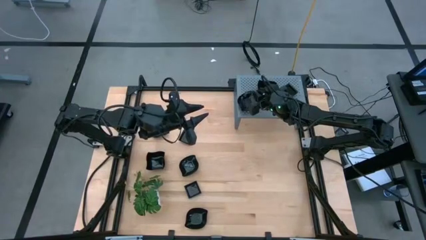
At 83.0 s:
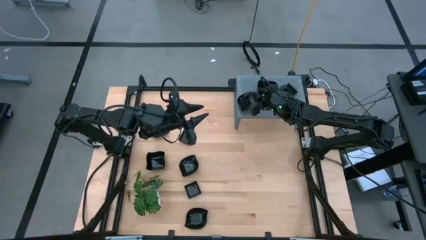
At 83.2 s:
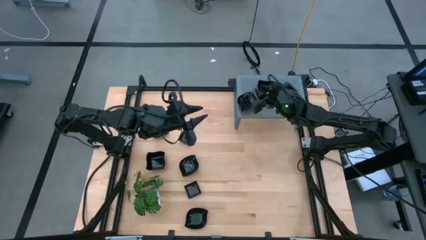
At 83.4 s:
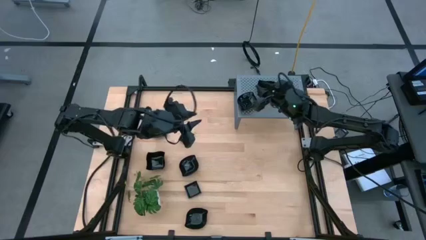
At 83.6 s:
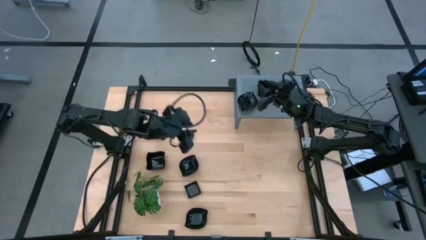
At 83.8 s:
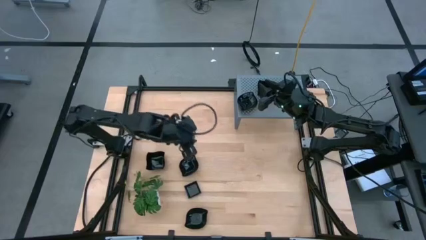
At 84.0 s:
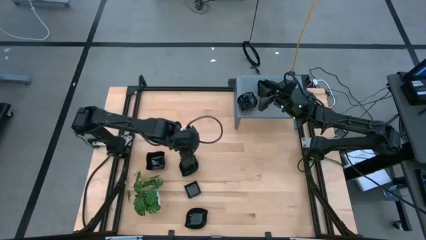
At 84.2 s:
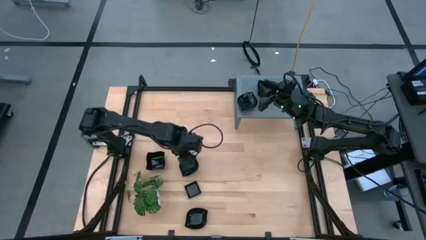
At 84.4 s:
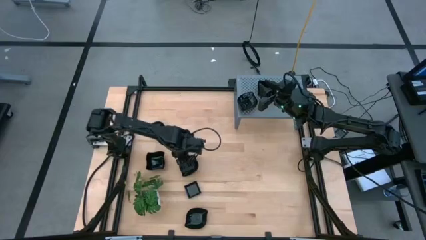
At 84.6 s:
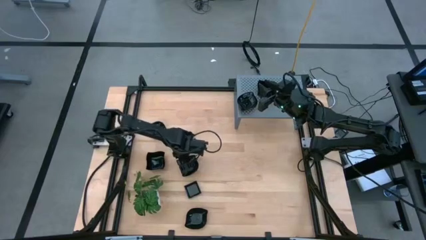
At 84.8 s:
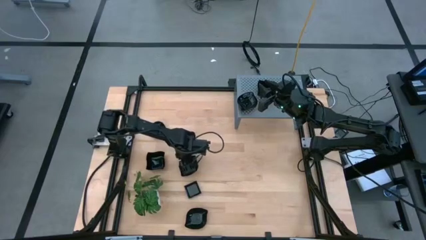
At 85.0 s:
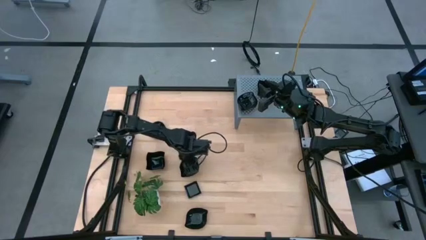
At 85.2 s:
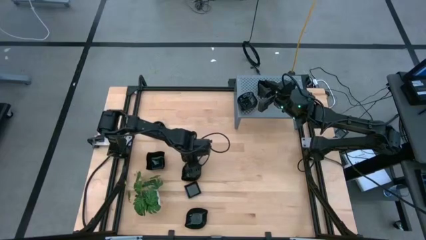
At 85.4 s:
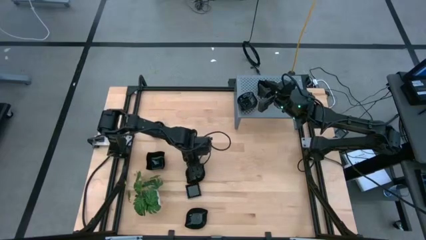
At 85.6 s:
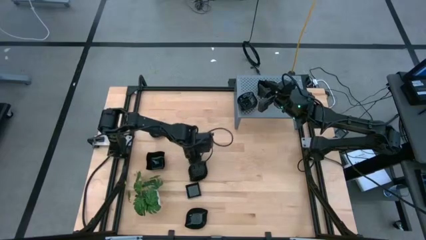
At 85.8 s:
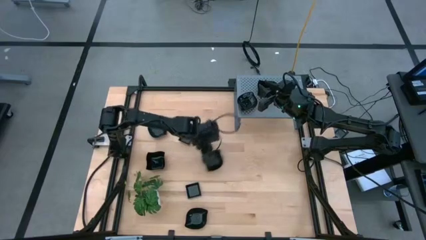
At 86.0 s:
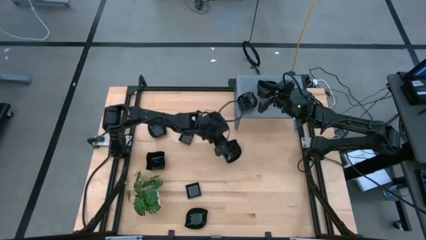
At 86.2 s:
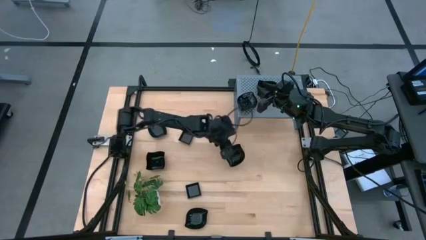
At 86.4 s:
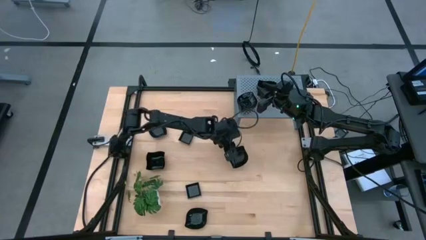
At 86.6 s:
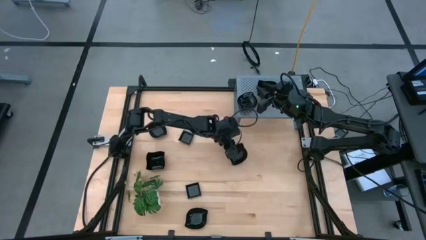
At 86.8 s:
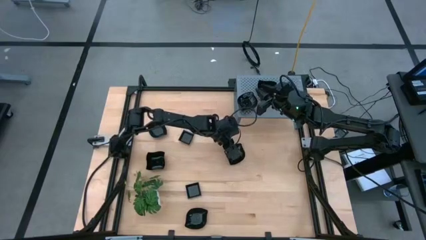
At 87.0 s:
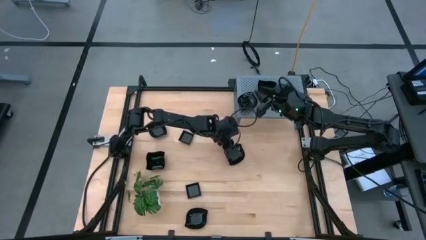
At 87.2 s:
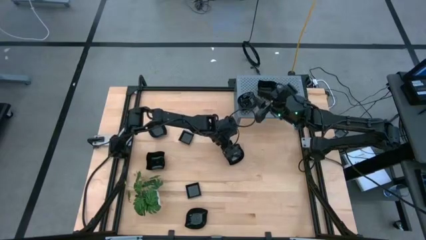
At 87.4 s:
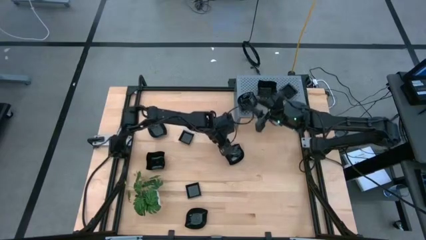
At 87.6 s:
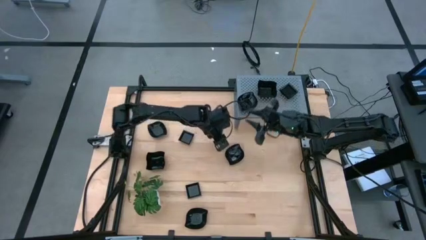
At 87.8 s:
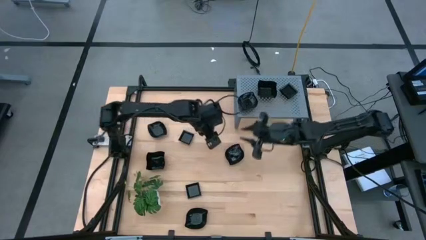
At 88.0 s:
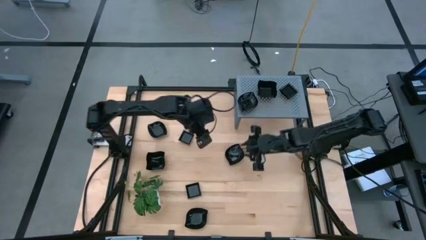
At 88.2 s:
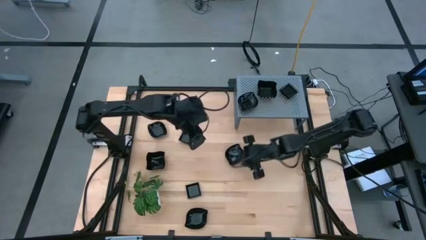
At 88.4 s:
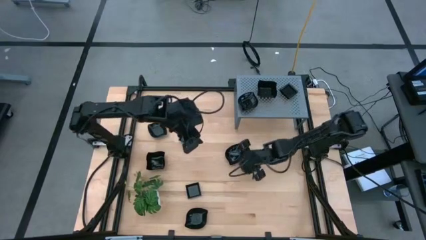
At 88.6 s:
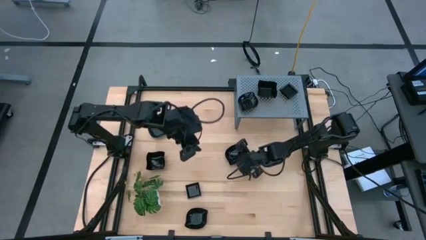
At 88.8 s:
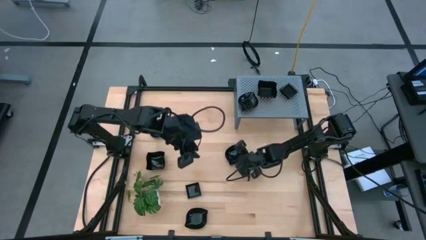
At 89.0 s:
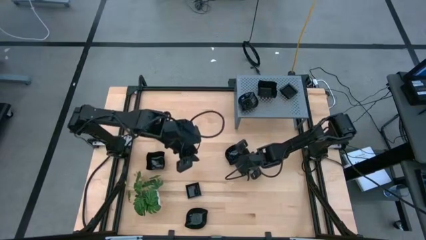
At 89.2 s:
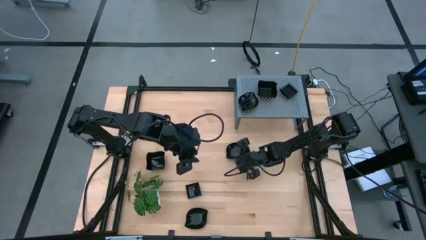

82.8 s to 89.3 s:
Task: Pick & Place Mini shaped plates
Stack the leaf-shaped plate on the leaf-shaped plates on the shelf

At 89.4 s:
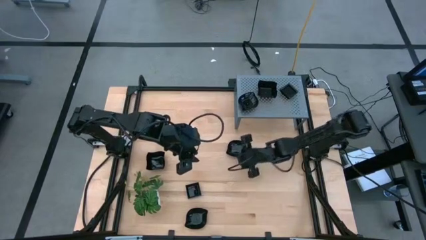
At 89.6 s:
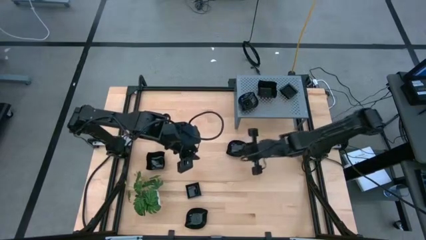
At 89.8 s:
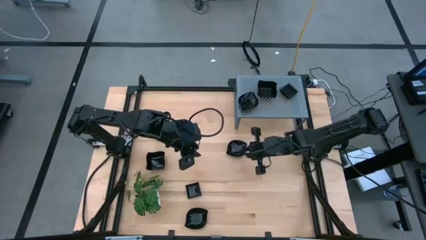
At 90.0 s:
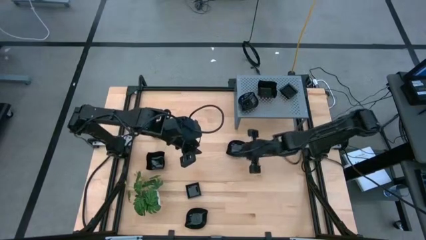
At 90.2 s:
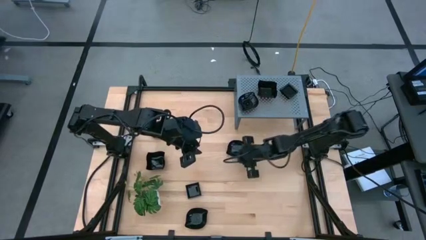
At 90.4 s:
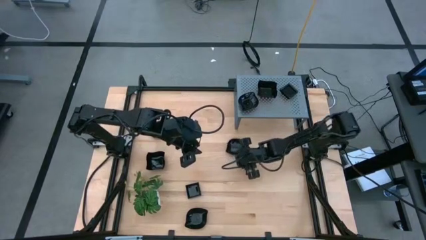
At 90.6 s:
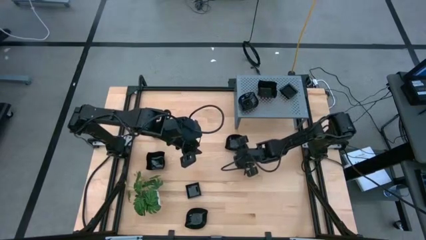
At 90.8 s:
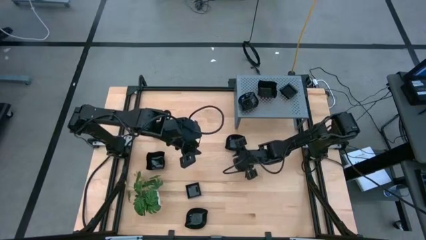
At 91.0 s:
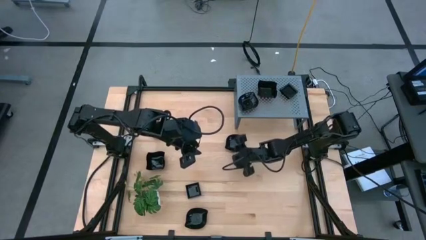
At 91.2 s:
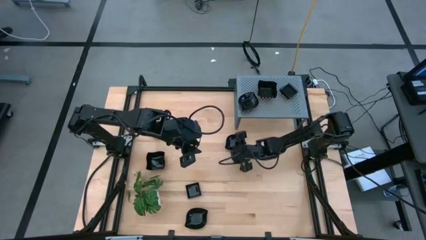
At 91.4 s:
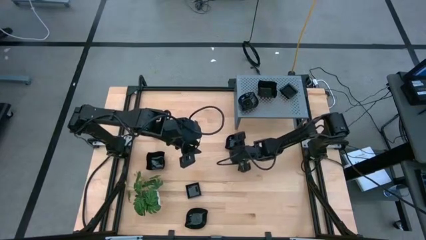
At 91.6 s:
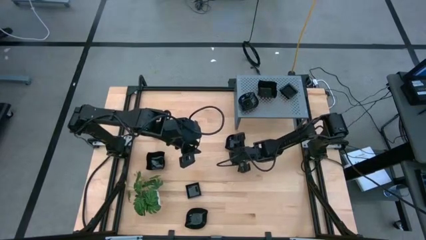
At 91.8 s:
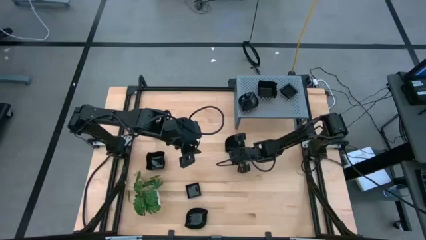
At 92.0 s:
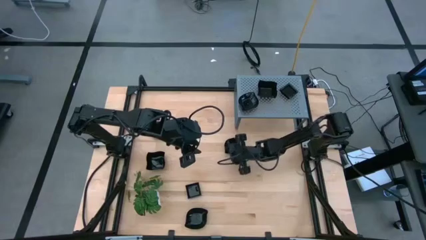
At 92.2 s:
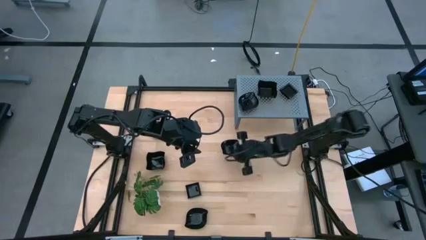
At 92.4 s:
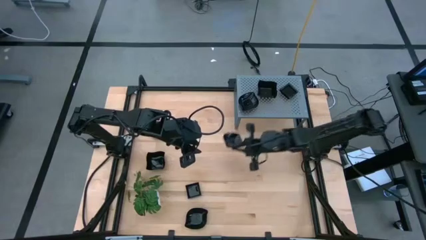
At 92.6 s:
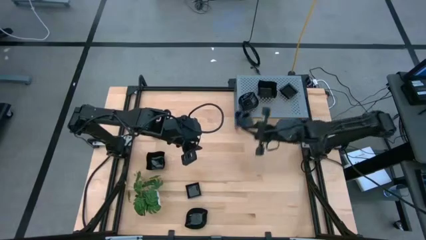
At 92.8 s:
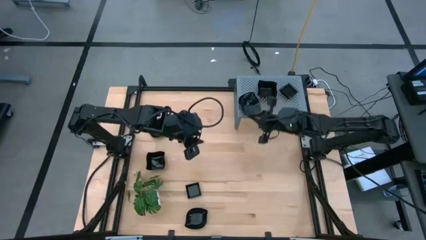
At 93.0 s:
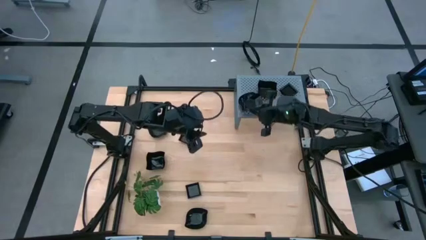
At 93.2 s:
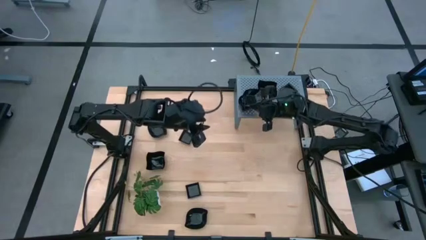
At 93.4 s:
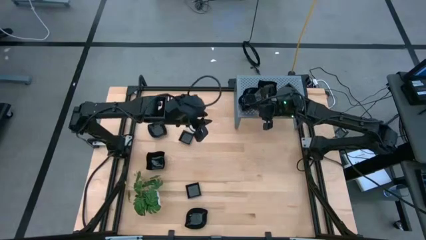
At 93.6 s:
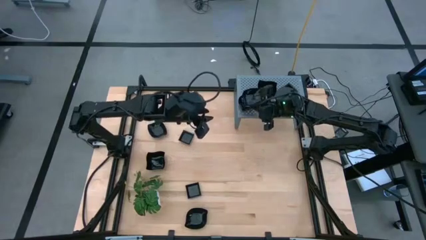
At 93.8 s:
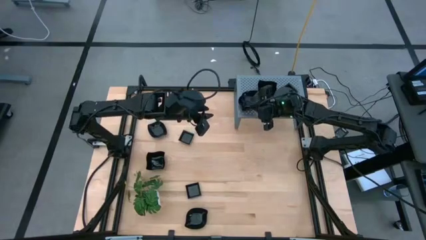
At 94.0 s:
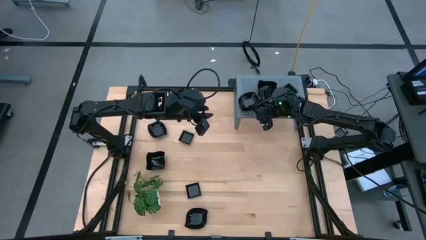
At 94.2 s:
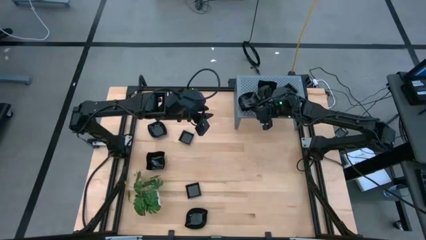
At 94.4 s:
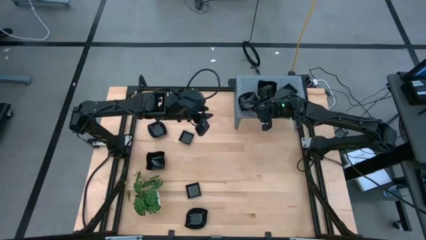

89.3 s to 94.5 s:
Stack the leaf-shaped plate on the leaf-shaped plates on the shelf

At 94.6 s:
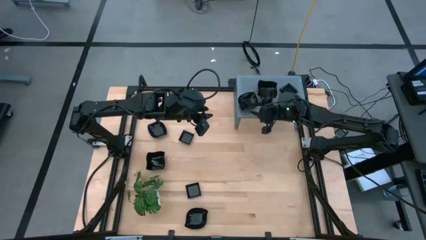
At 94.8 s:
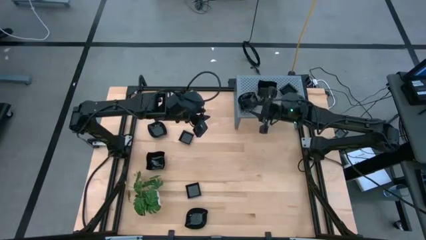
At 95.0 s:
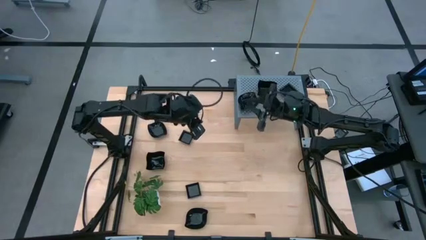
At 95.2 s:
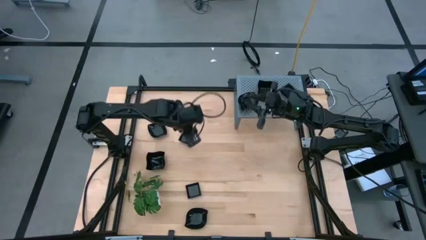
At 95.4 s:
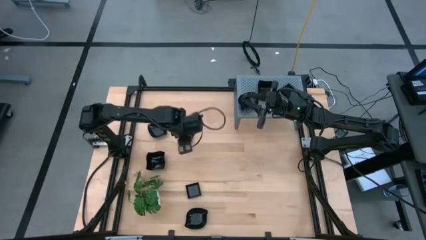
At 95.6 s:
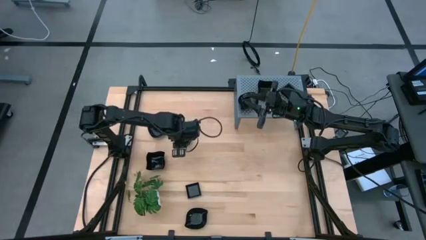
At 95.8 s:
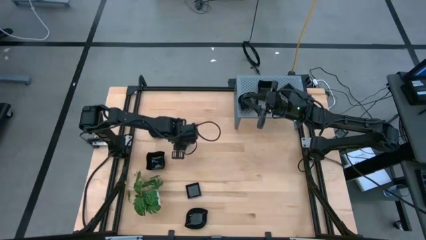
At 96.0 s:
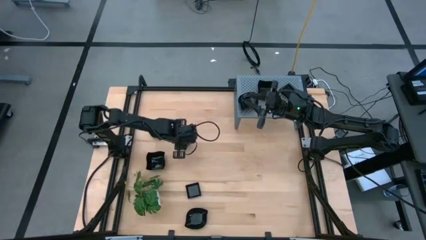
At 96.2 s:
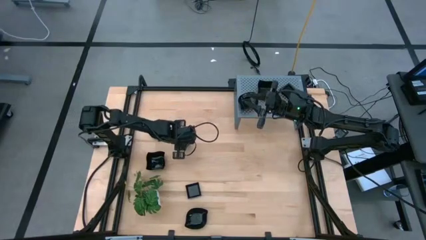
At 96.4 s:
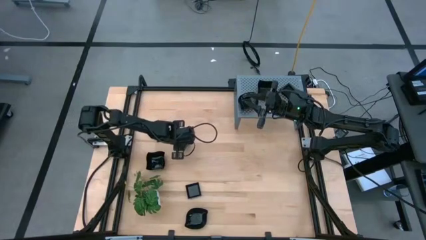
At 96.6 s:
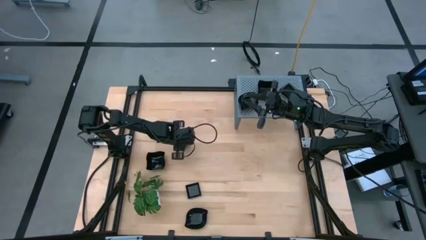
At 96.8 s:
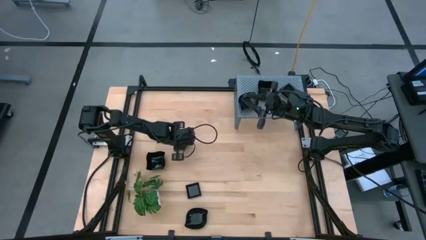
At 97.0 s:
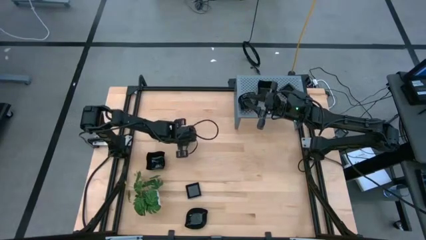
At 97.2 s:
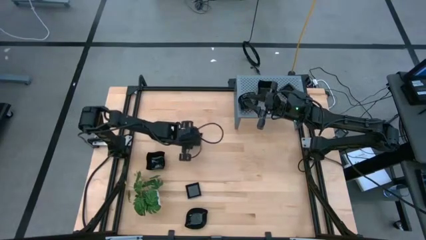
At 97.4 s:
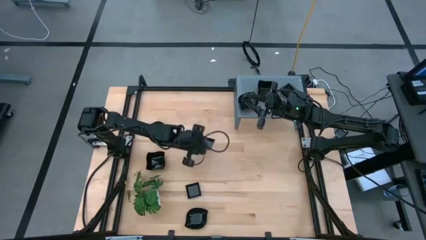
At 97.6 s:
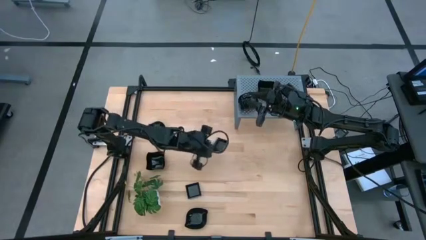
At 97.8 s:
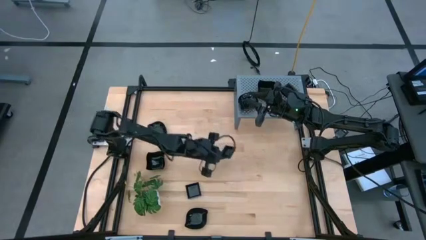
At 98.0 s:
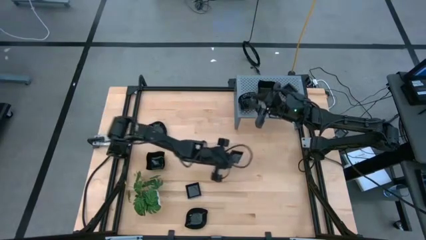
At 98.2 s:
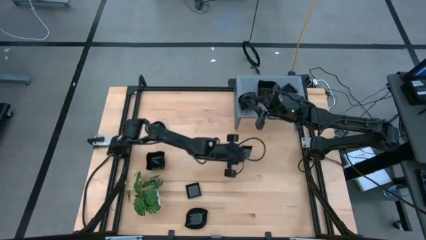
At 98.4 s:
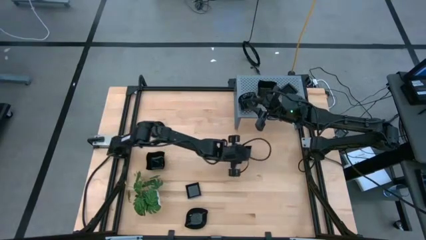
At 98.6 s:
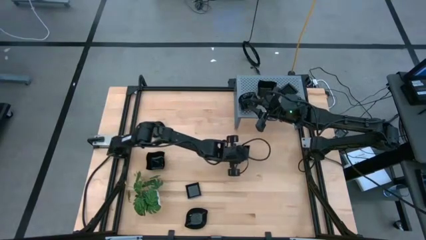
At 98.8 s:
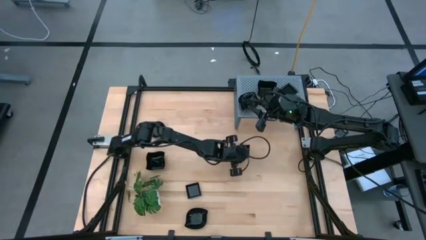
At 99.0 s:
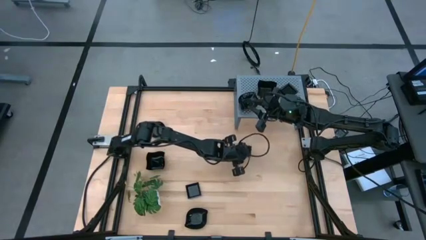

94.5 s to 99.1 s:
Move the square plate to the middle of the table
